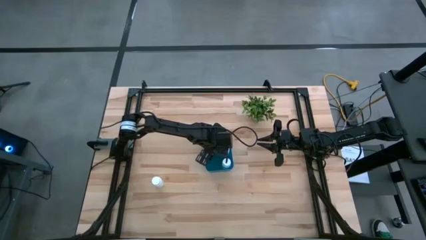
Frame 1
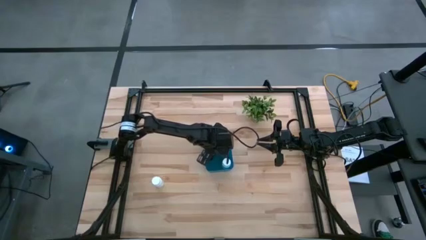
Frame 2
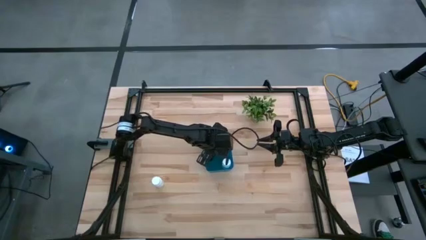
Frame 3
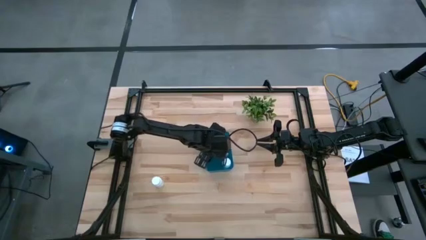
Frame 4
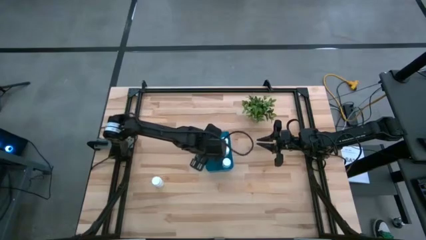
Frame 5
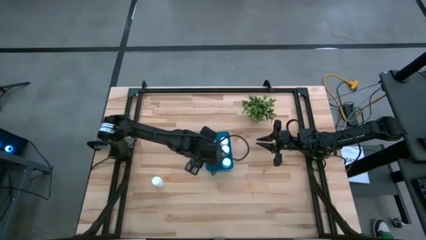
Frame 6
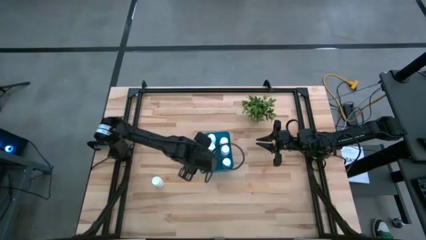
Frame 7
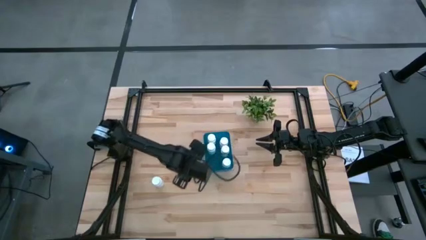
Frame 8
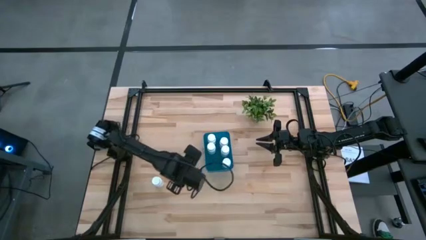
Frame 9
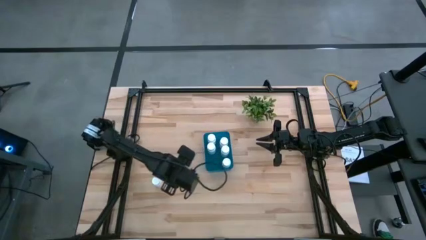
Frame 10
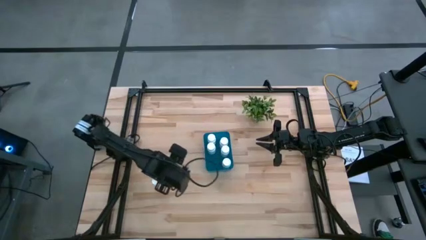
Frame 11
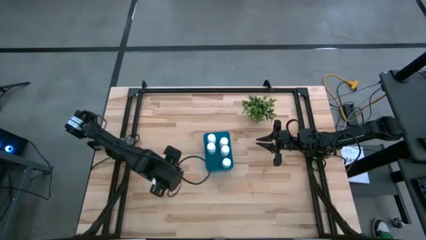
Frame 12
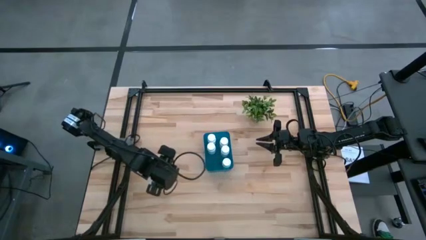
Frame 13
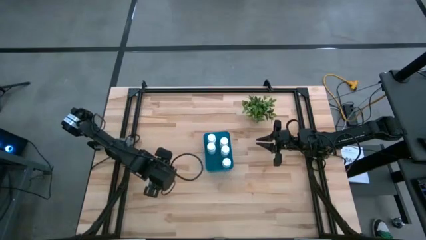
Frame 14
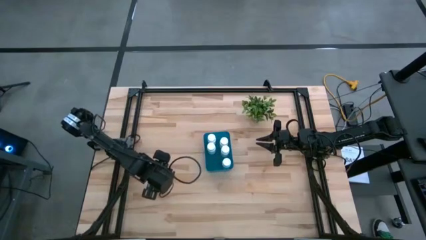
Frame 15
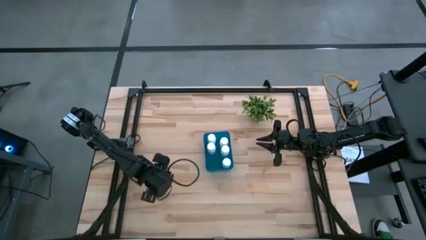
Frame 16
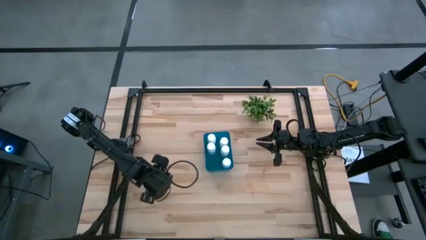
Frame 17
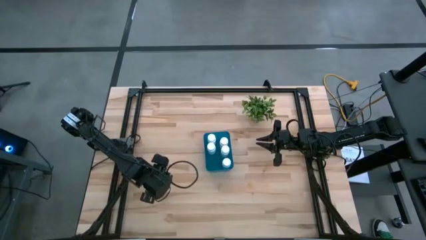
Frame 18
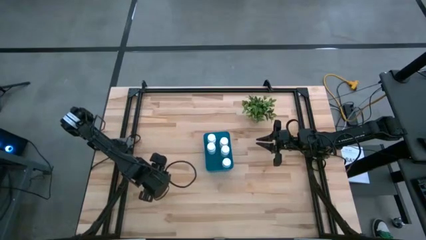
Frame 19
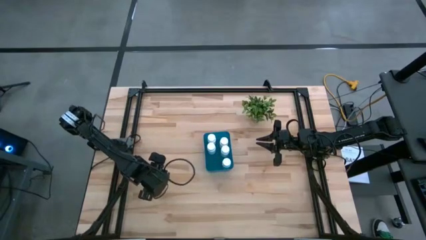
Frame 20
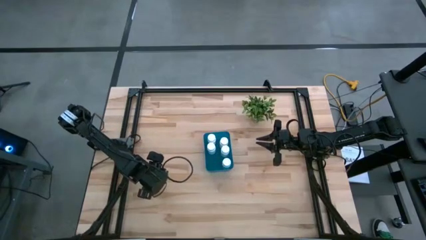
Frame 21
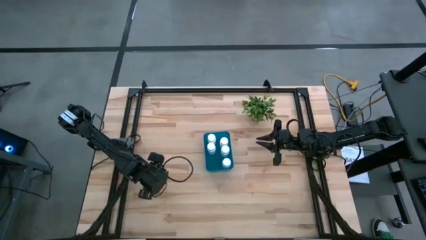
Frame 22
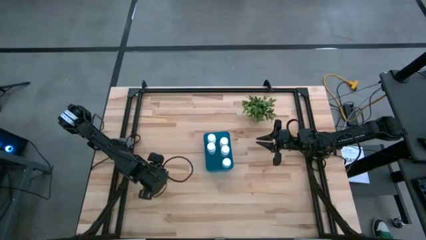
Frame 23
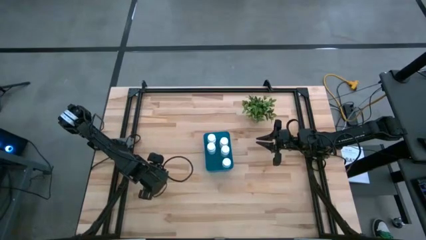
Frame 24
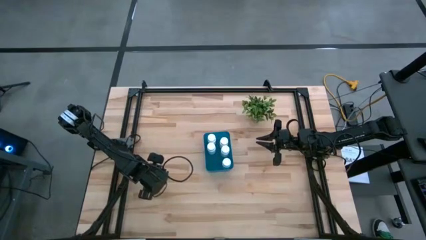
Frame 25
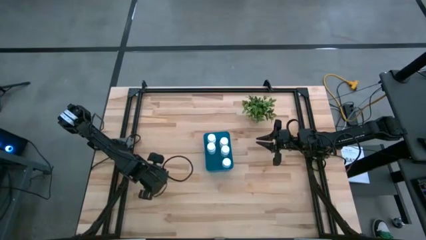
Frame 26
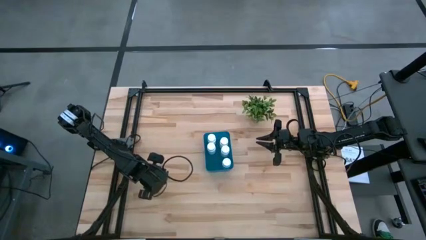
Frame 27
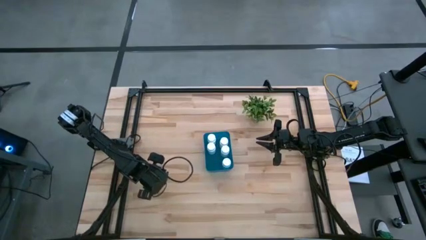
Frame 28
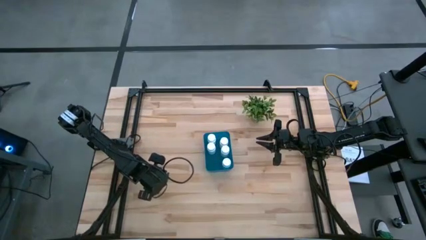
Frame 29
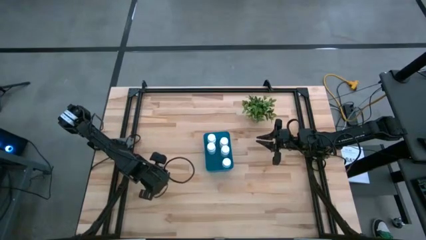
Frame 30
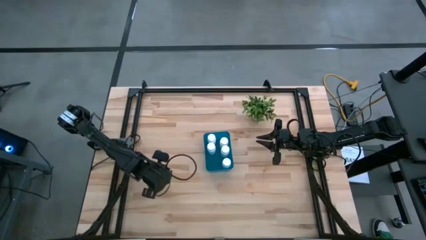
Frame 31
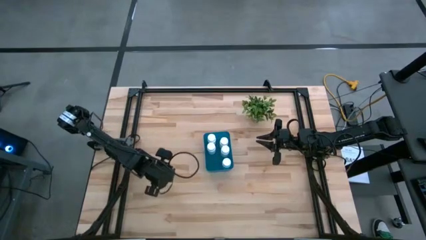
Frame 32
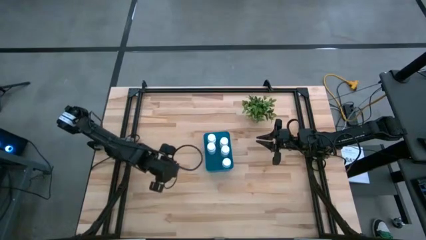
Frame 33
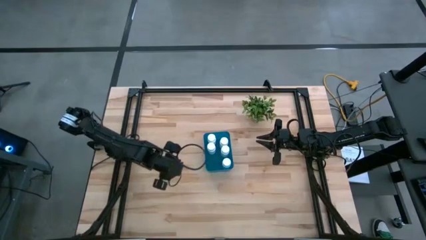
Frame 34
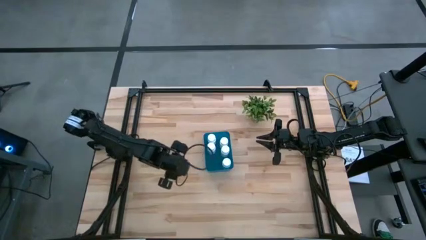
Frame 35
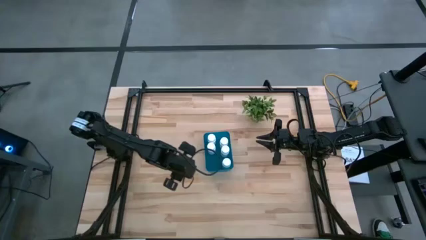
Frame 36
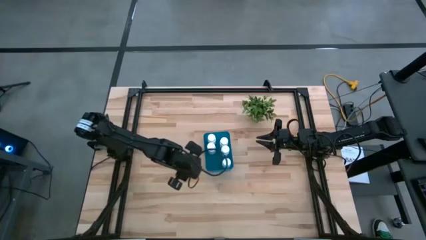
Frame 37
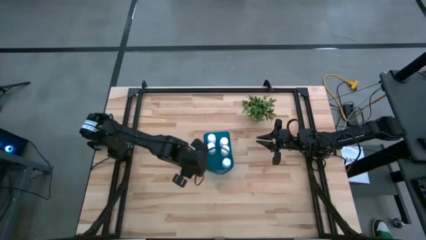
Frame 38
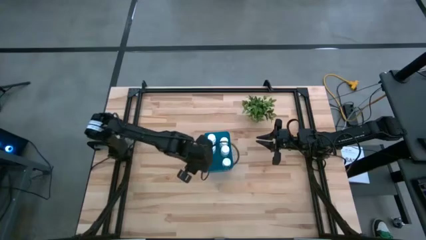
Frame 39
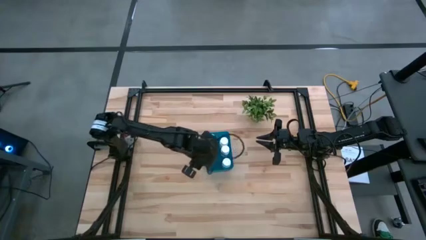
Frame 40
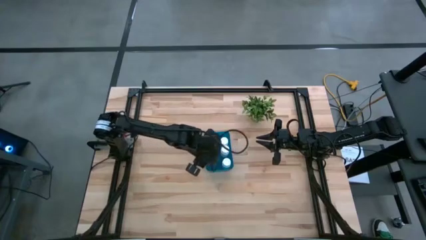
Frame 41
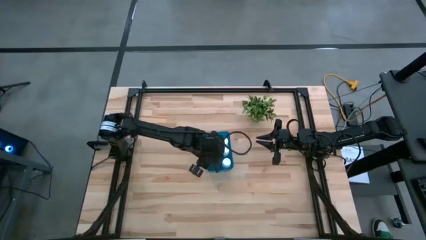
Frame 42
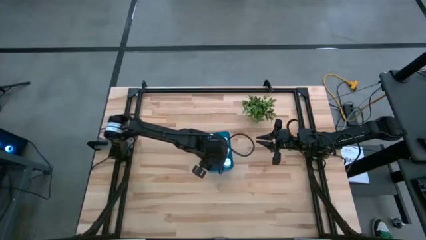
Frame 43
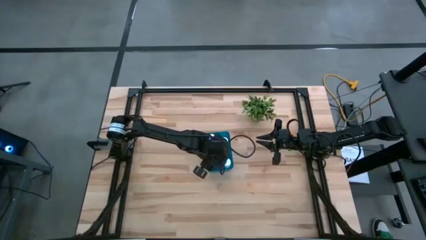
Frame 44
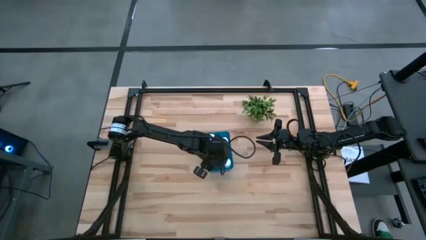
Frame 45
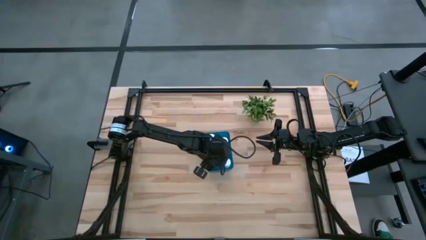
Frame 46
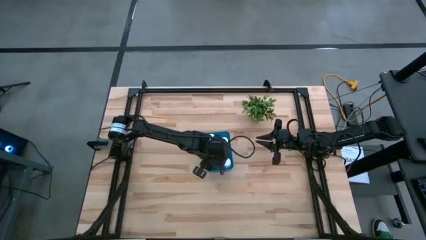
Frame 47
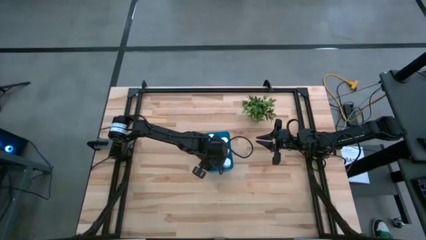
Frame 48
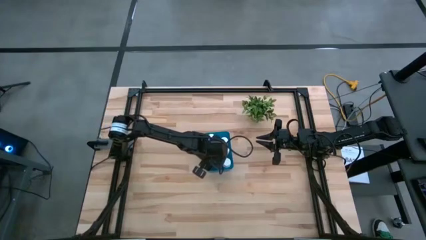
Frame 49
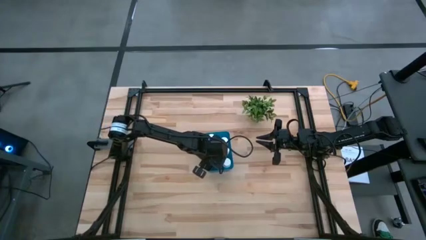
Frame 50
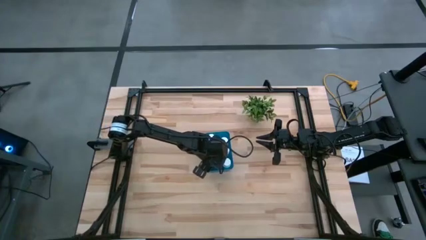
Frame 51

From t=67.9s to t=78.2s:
Task: Pick and place pill bottles into a basket
Put the white pill bottle into the blue bin

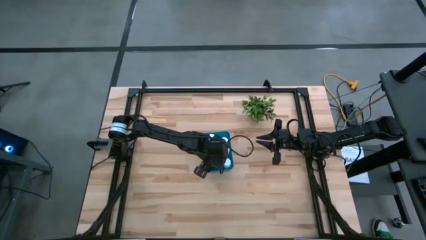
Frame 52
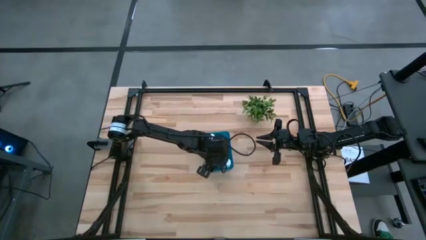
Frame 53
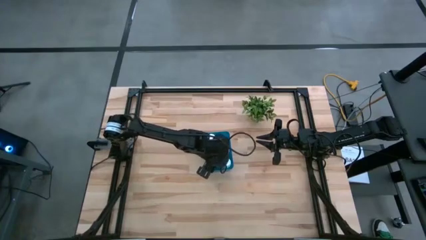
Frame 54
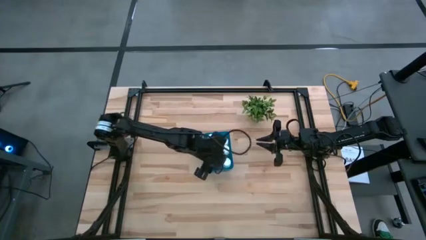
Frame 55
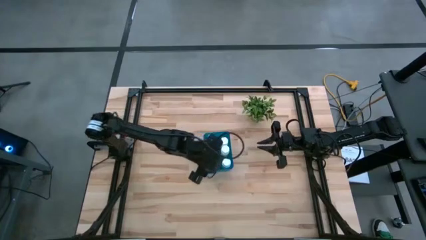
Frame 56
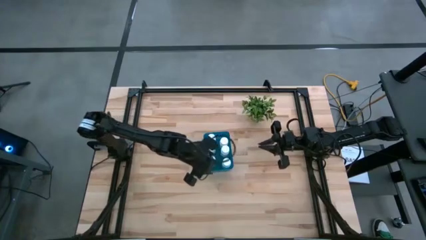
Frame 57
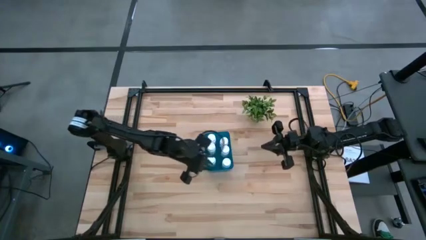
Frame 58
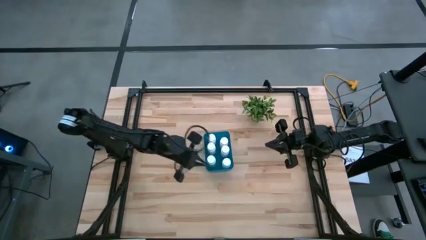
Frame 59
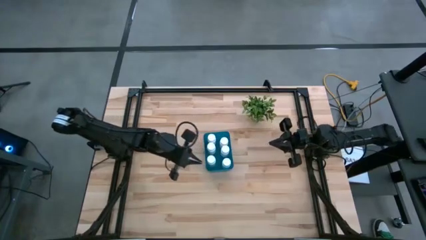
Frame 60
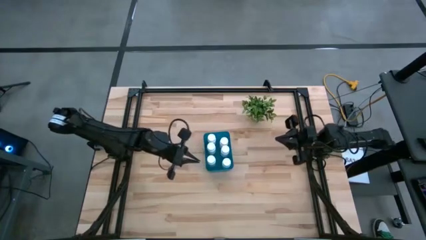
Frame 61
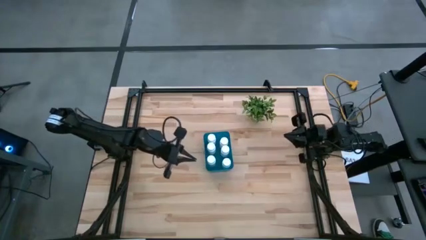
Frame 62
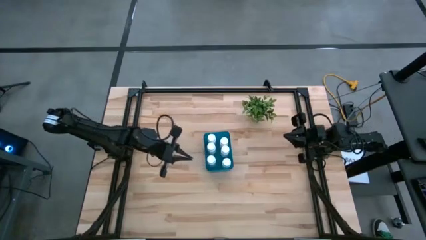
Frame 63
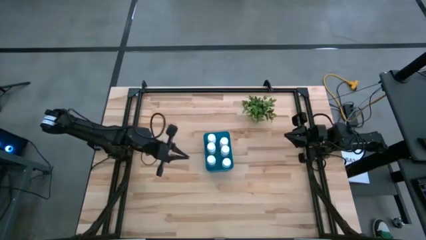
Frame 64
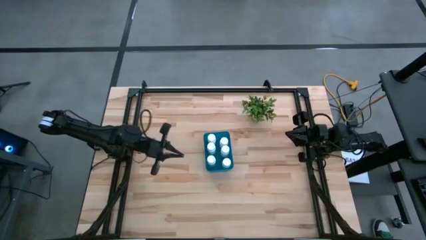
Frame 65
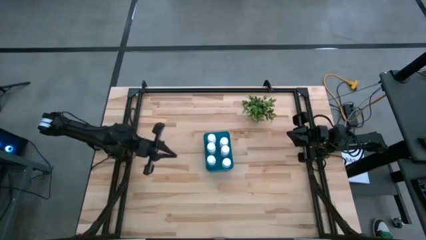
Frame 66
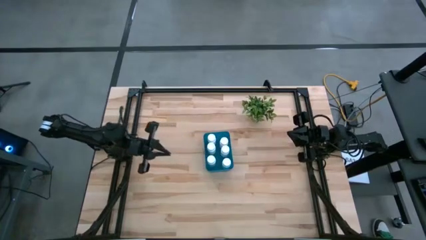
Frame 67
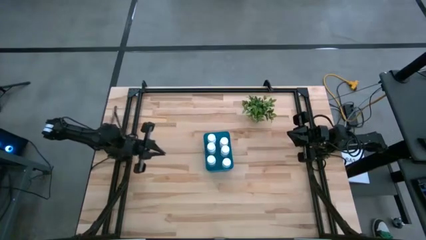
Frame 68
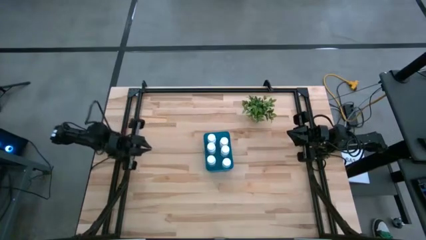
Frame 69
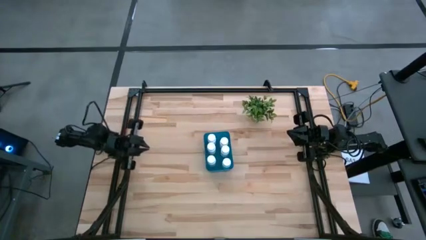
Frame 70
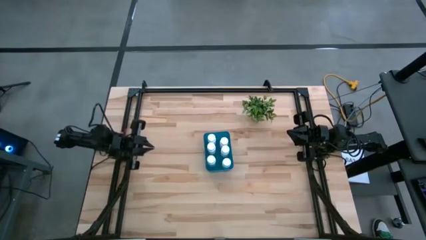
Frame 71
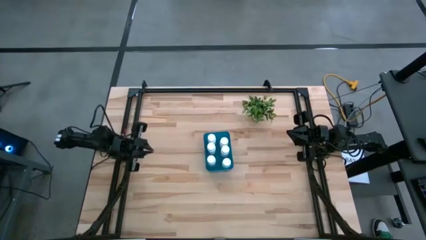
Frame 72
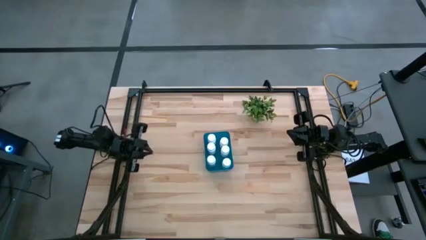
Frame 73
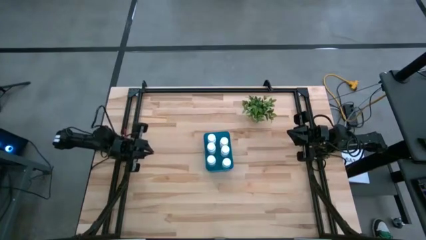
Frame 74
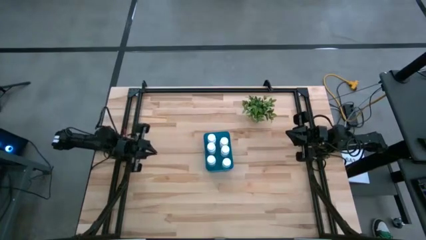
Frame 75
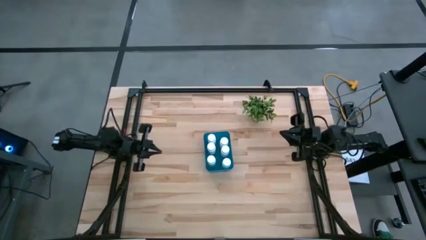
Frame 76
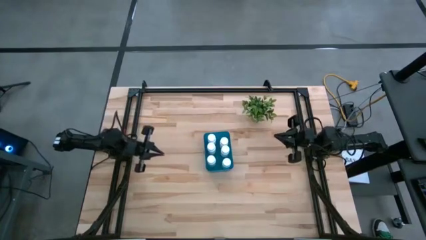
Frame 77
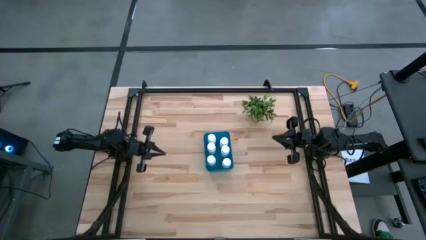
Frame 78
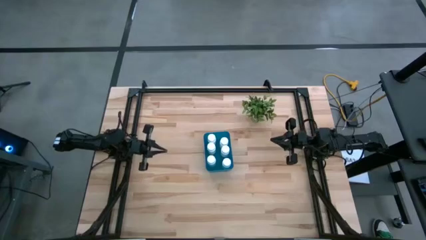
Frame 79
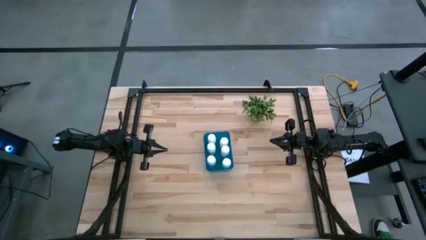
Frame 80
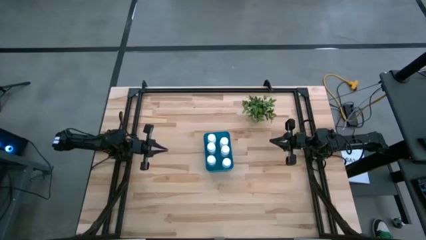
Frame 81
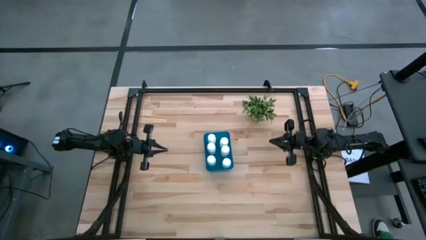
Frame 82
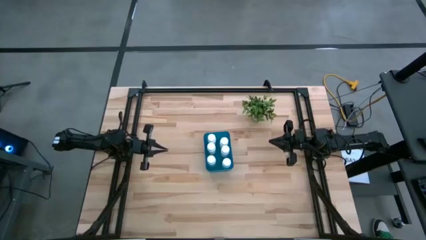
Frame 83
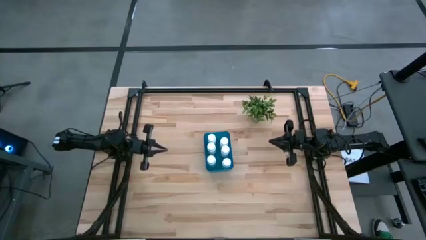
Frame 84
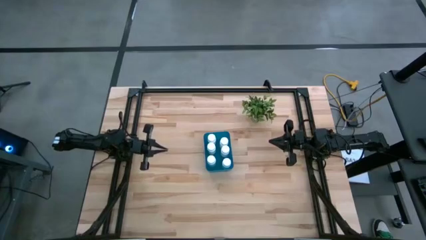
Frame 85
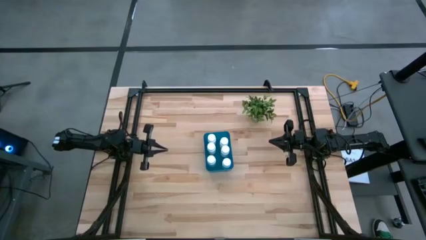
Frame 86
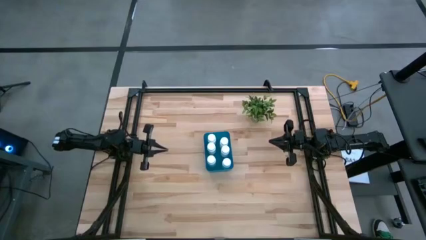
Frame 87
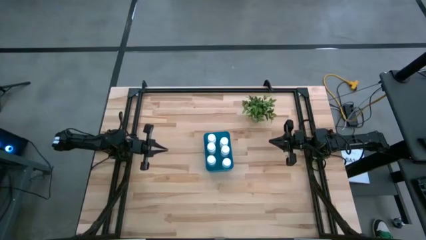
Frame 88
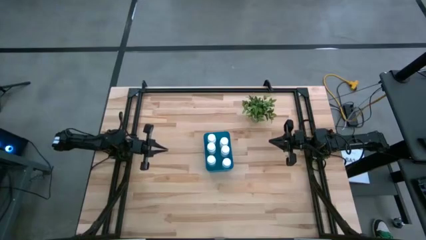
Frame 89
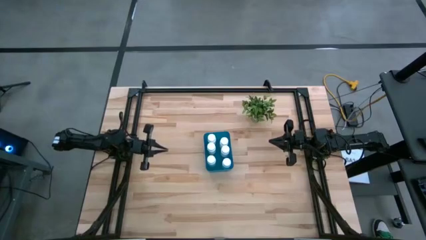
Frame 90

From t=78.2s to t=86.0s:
Return to Home Position
